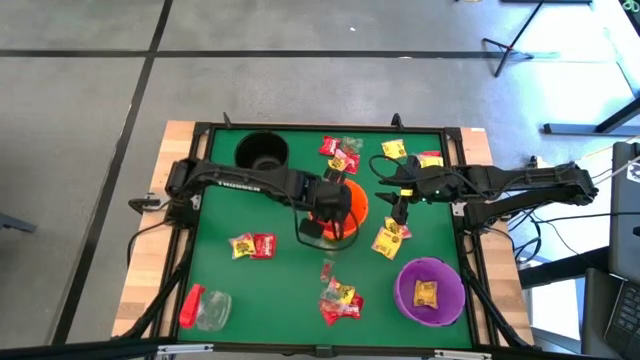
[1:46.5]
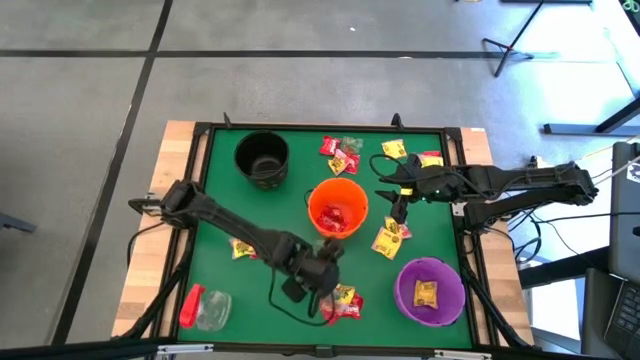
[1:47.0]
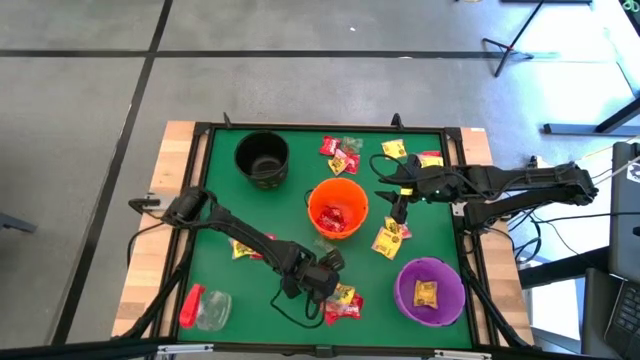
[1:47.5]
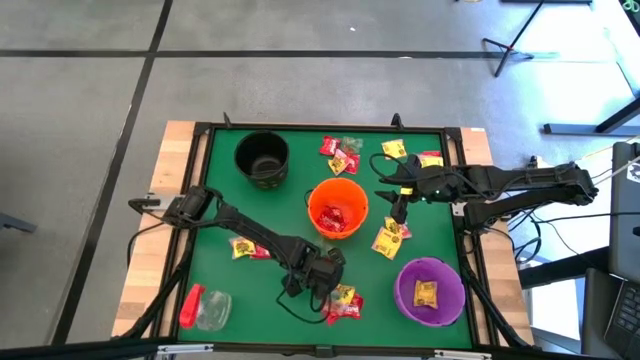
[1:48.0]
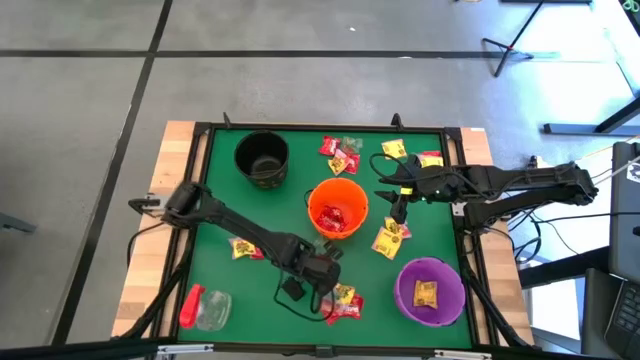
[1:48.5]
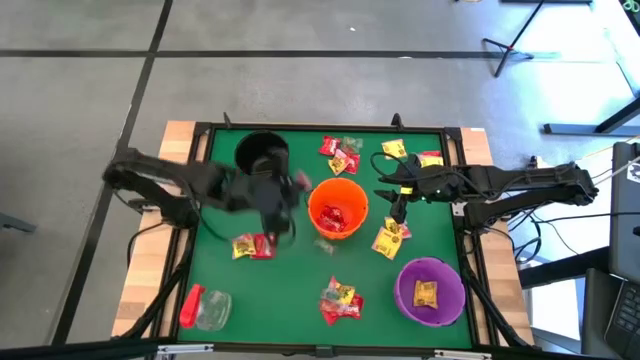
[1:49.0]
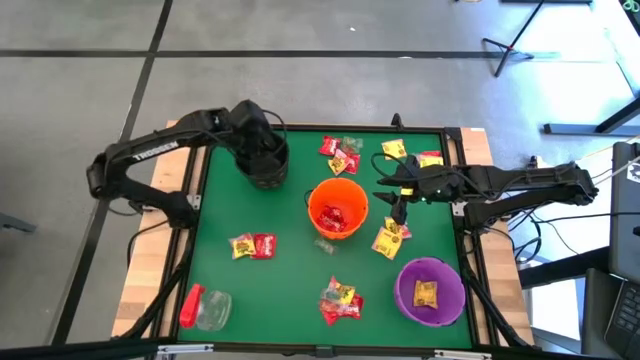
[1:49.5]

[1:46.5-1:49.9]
Task: Sort candy
Put the orange candy into the black bin

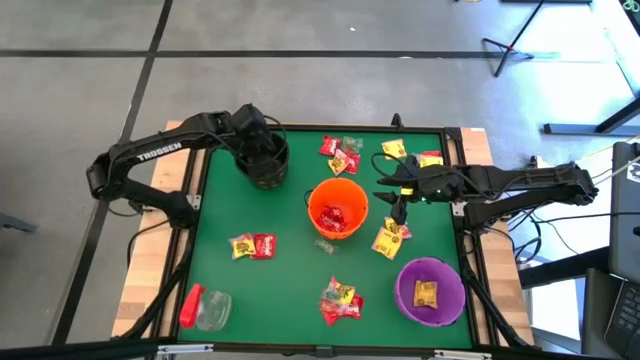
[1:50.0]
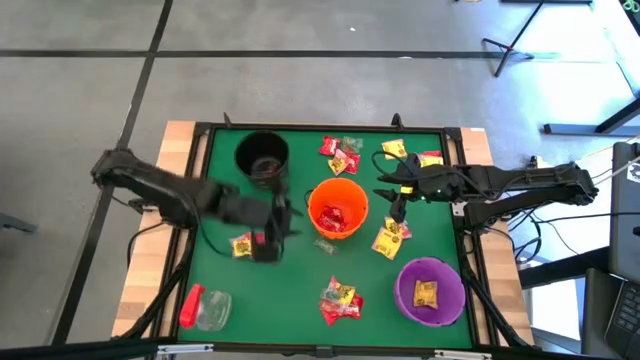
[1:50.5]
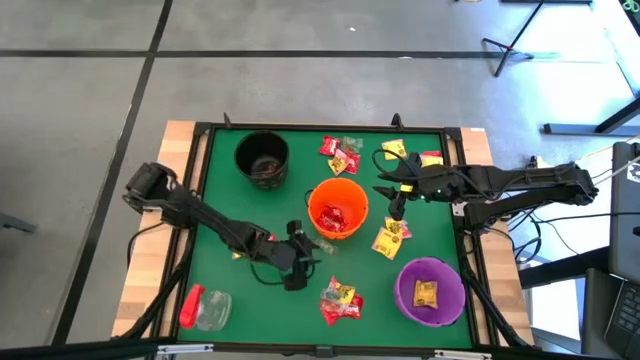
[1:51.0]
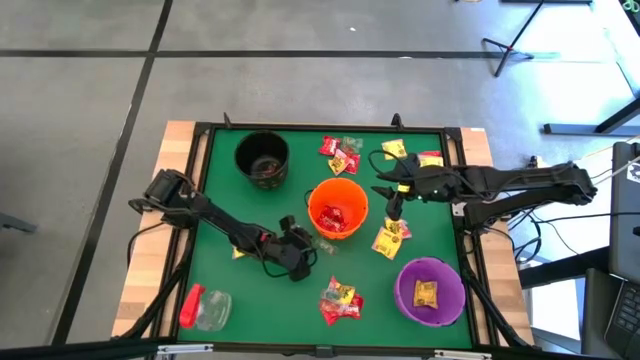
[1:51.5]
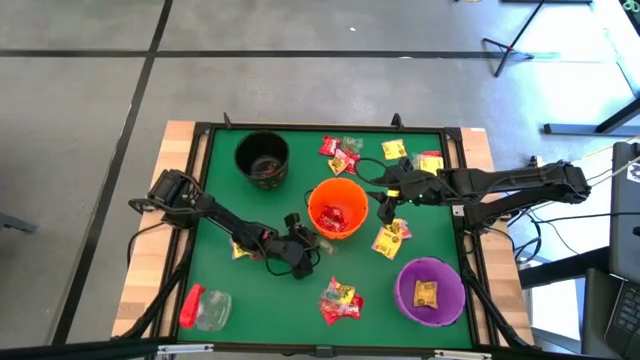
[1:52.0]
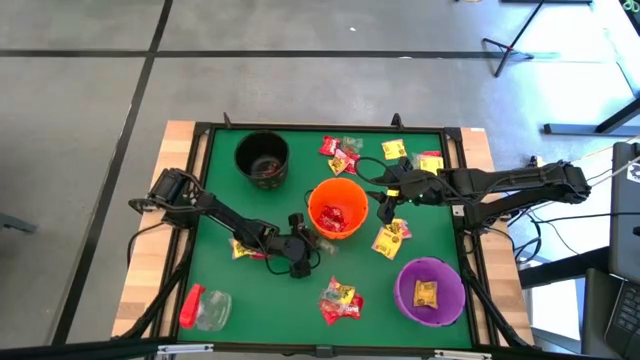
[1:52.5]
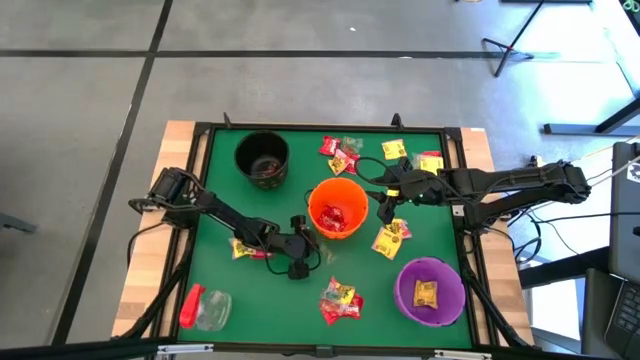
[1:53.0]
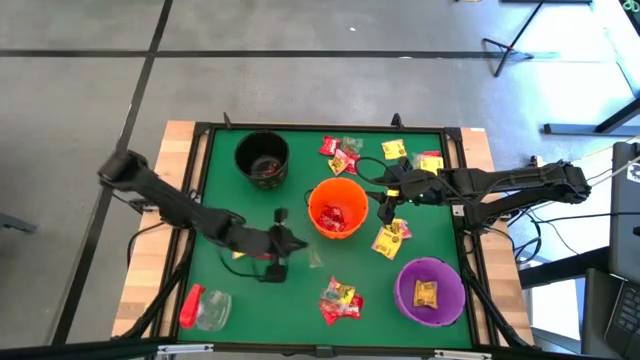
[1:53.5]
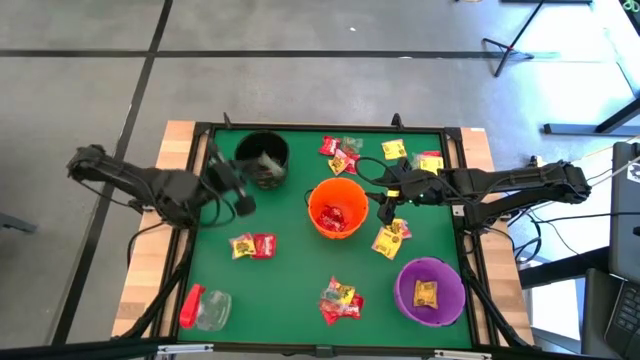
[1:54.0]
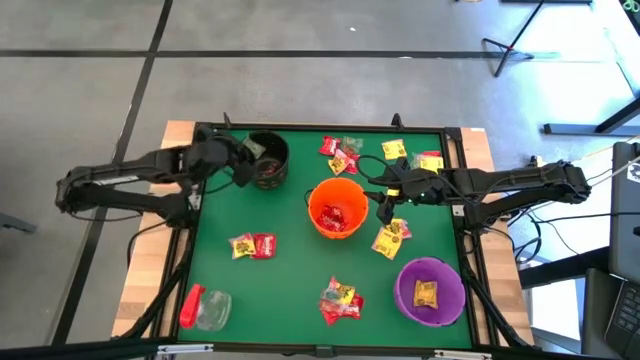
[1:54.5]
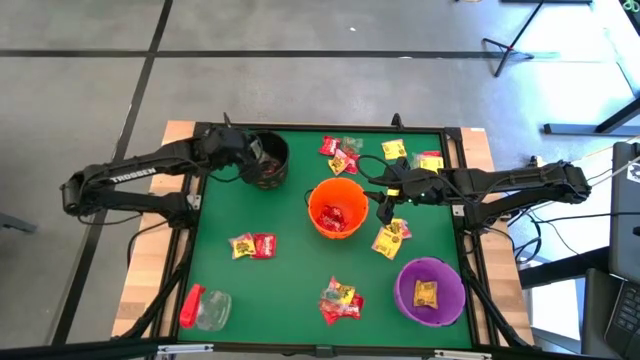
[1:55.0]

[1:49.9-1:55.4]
Put the green candy into the black bin

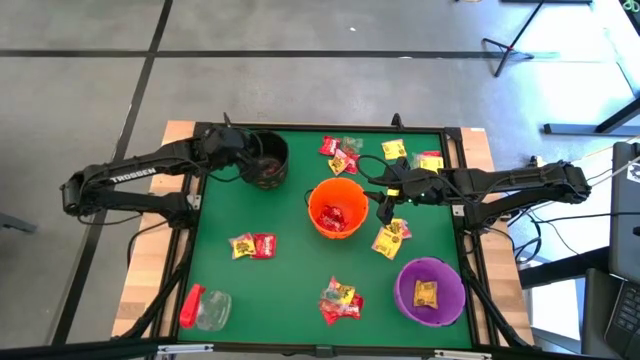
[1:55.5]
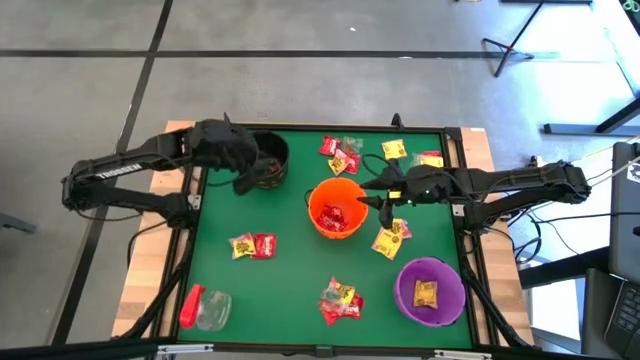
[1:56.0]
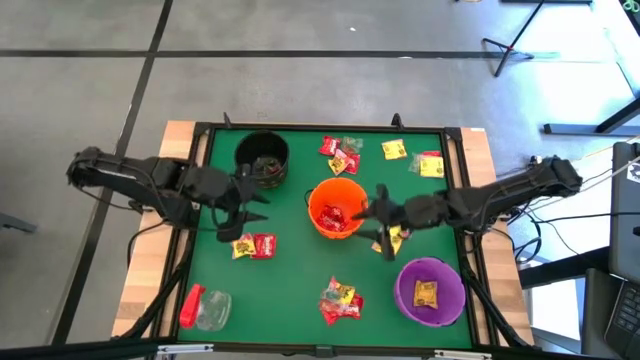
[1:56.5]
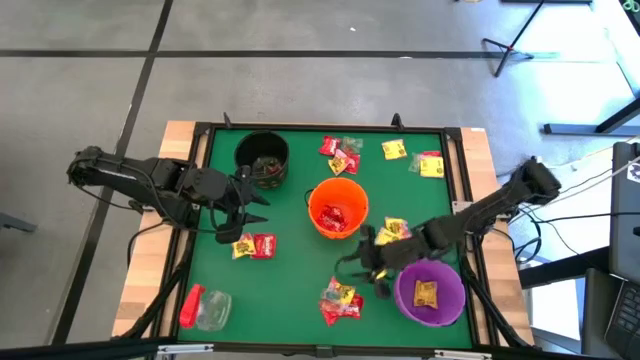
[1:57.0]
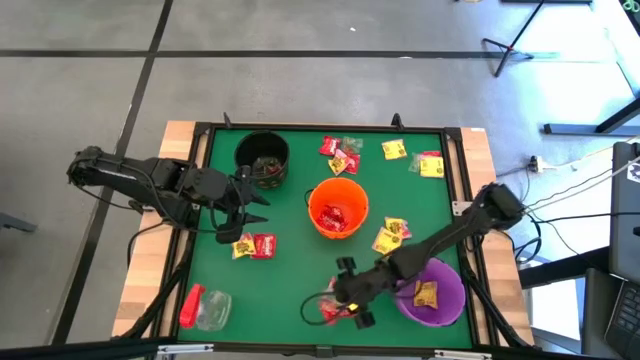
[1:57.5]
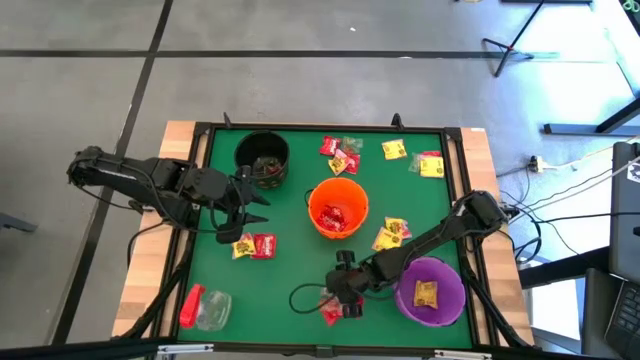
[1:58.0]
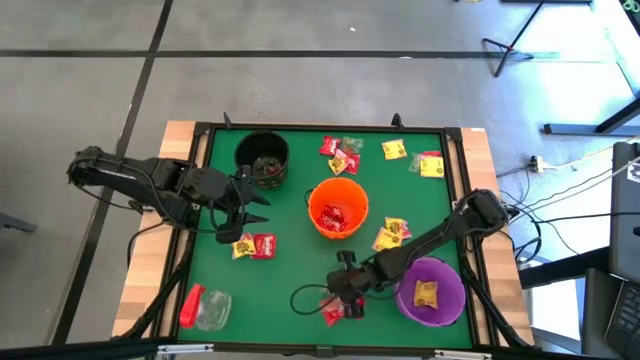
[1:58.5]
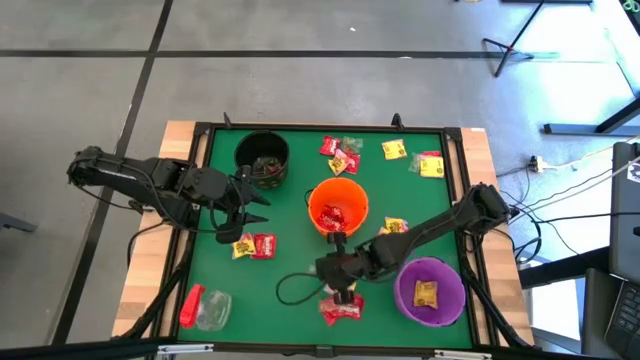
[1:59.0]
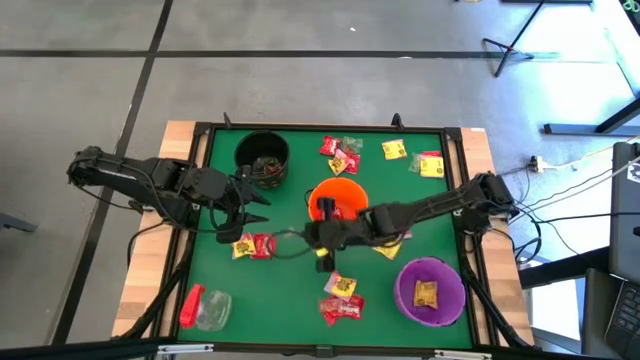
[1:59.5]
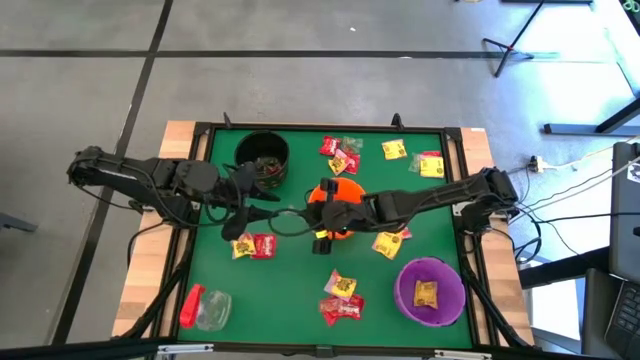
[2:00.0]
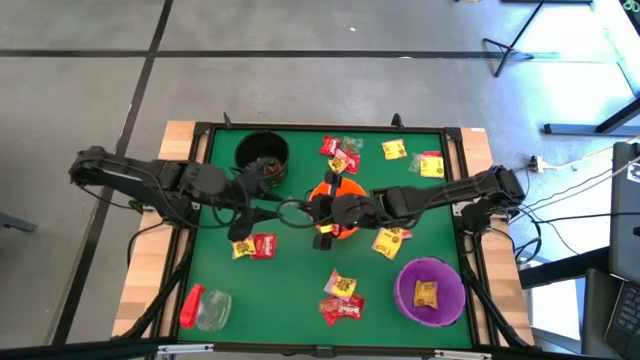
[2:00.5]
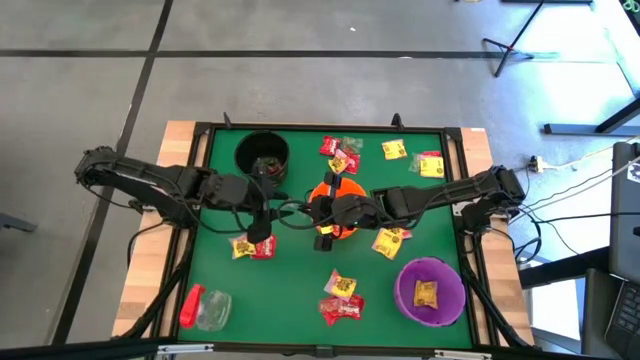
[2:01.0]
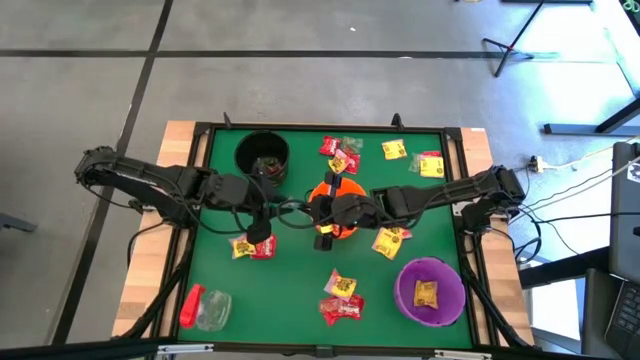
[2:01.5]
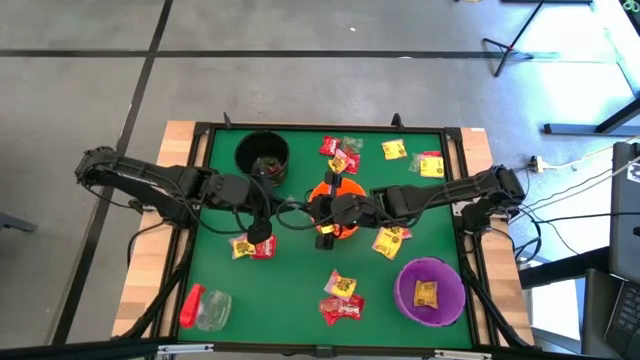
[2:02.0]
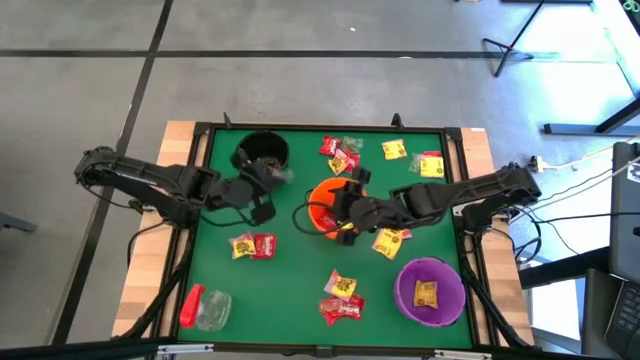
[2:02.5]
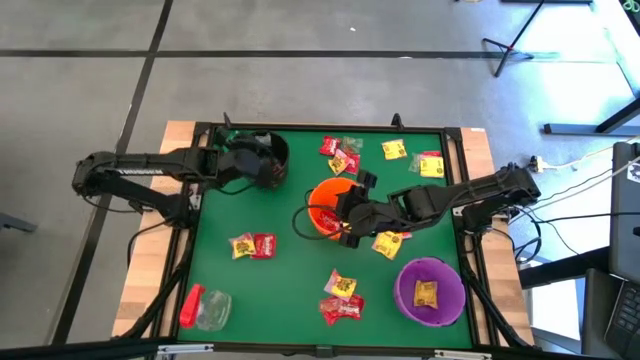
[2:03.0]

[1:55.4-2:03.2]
Put the blue candy into the black bin

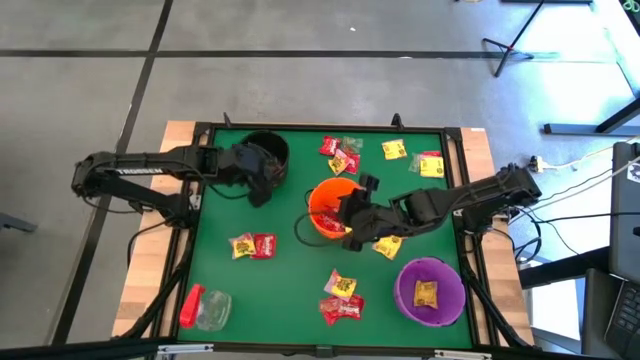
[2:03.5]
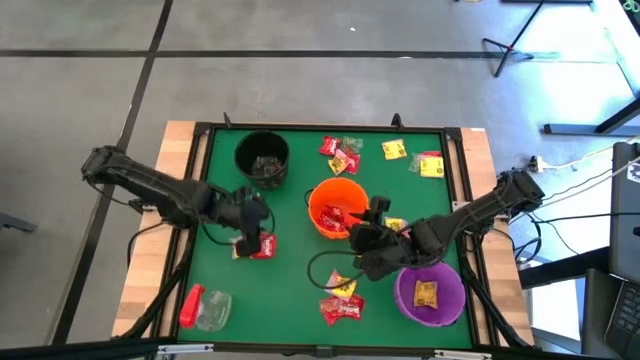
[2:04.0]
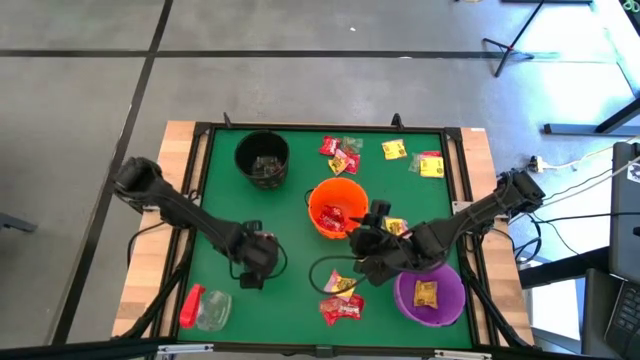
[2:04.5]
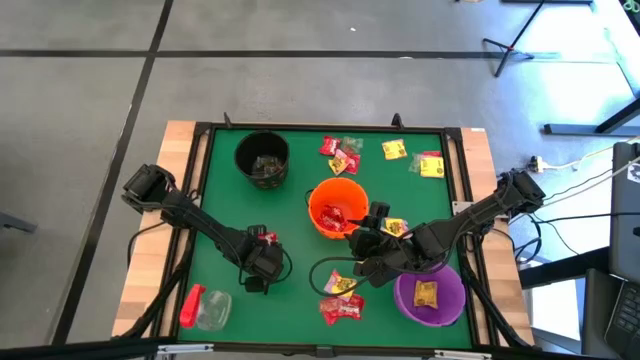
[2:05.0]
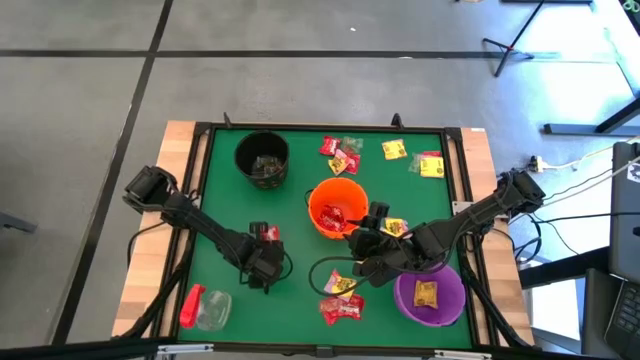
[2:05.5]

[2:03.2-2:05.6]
Put the red candy into the orange bin

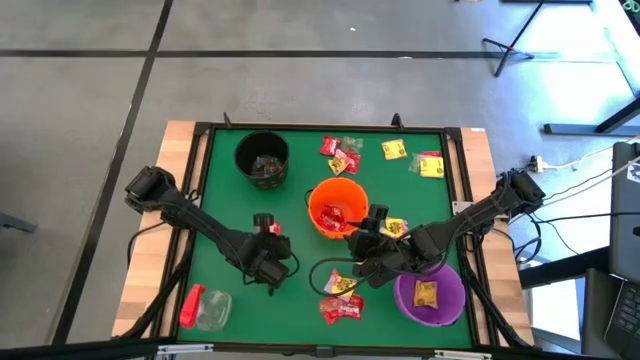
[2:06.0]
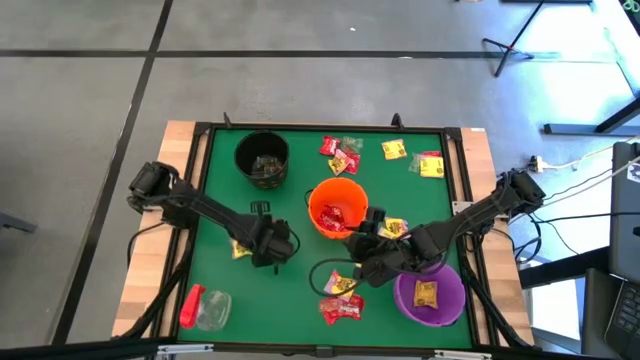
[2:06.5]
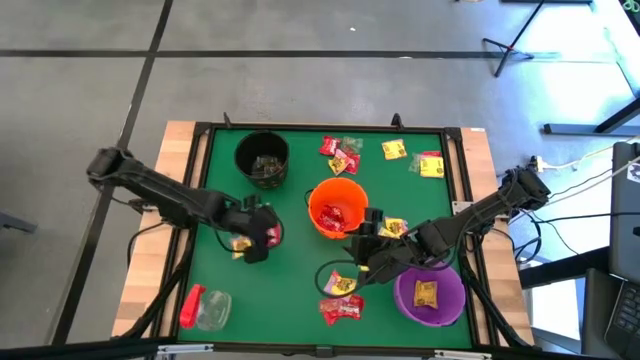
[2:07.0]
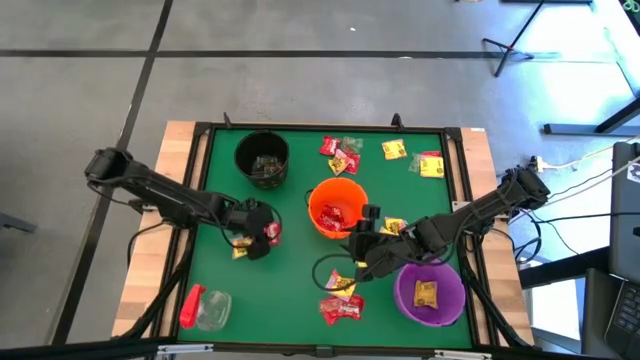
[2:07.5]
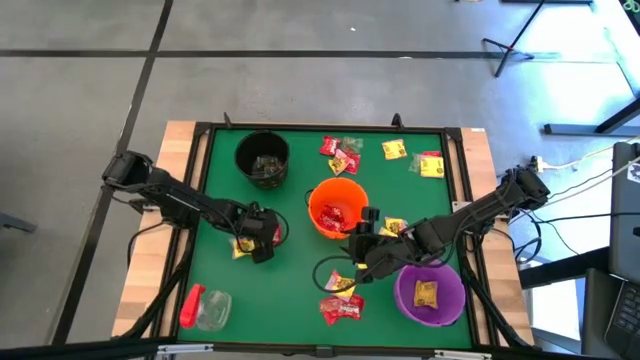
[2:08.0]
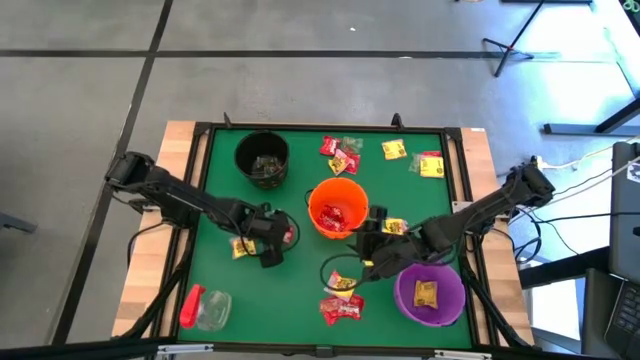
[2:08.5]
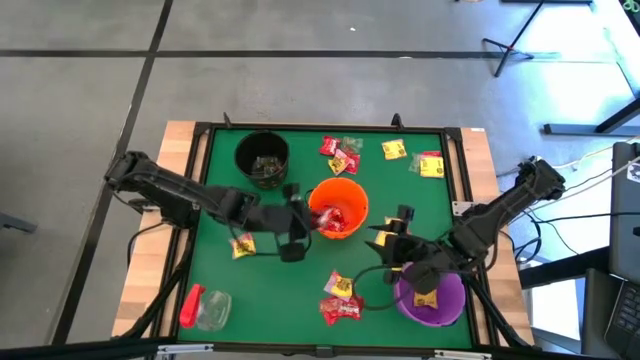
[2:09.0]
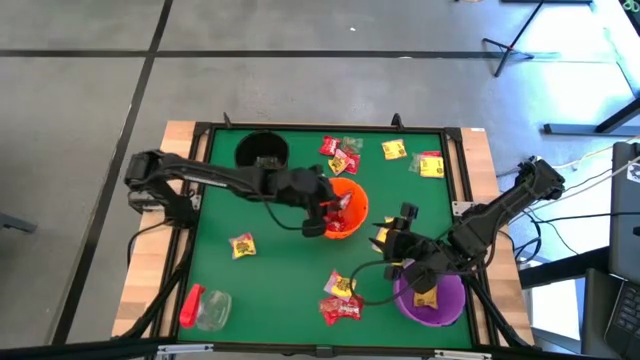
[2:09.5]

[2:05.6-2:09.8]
Put the red candy into the orange bin
